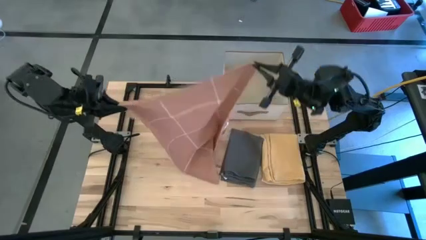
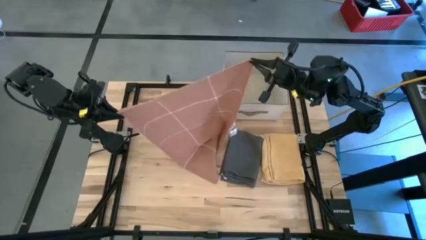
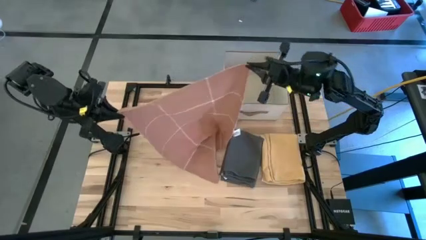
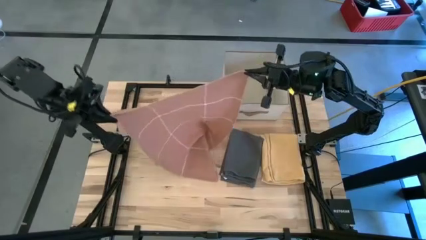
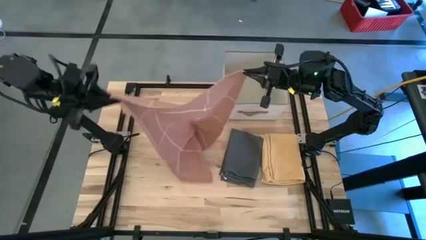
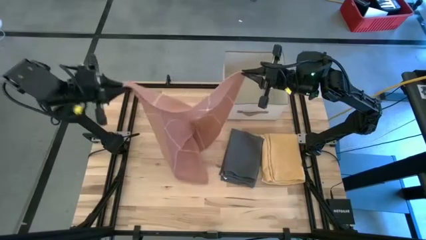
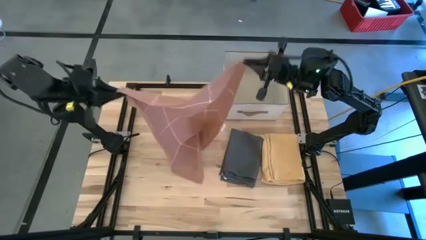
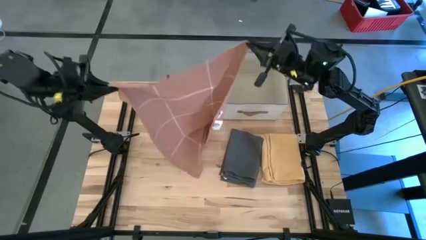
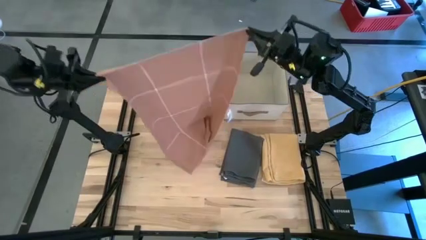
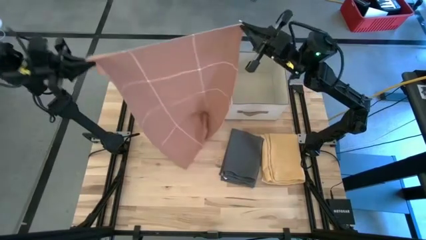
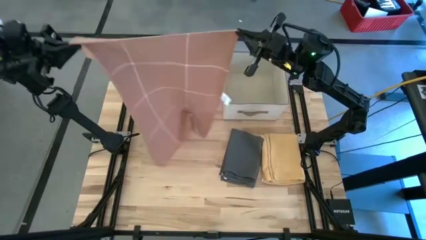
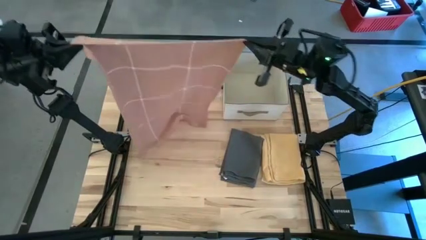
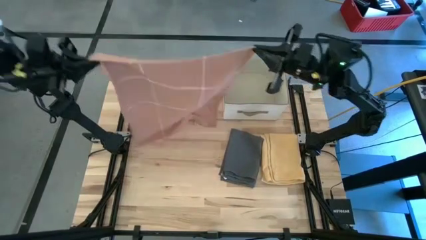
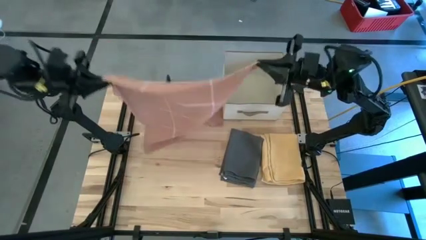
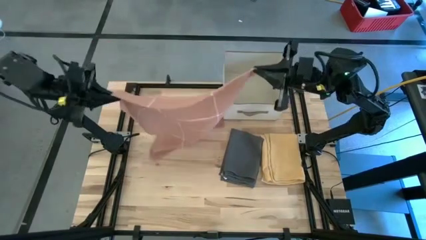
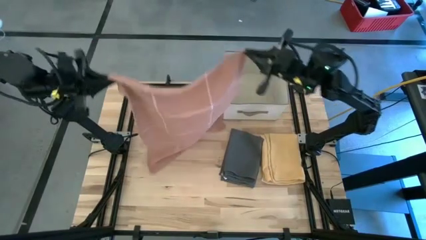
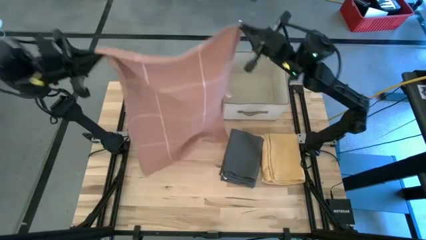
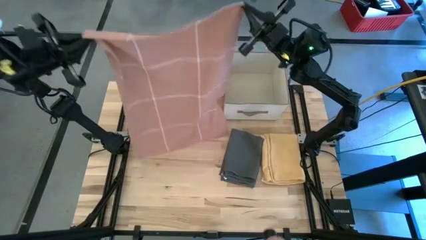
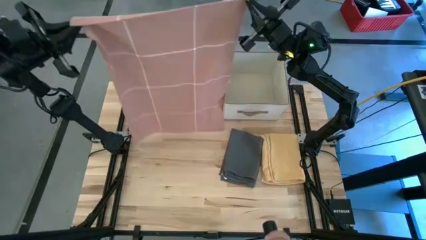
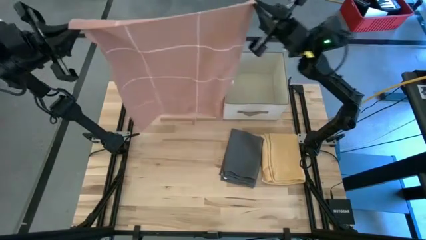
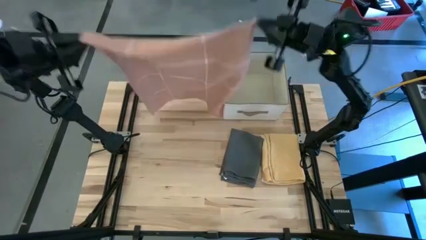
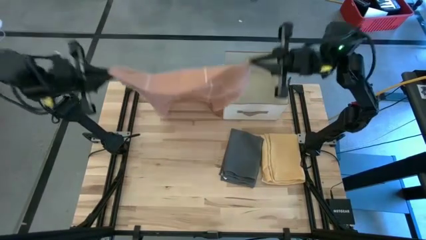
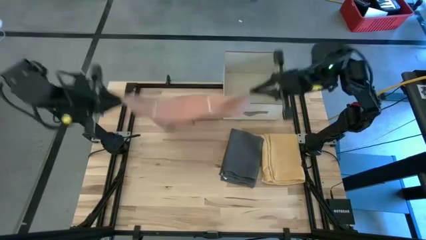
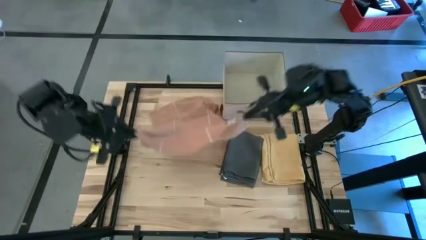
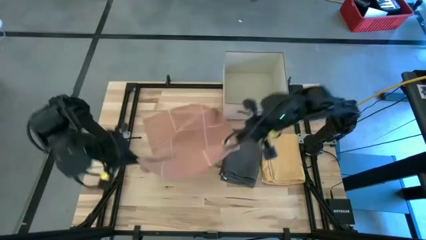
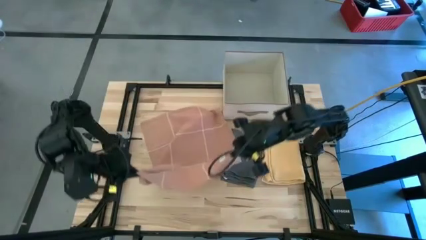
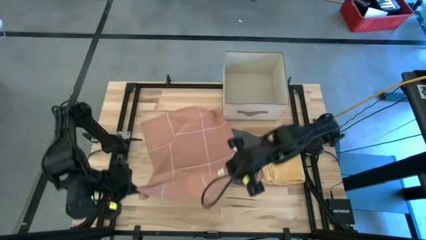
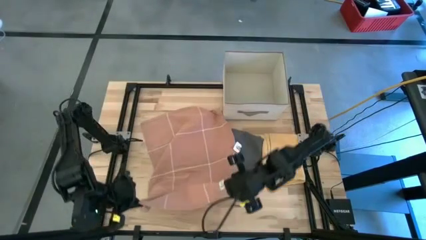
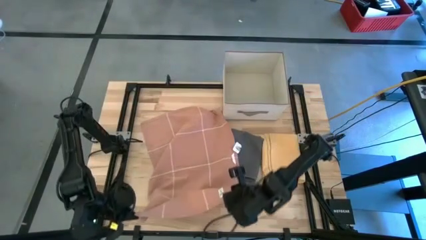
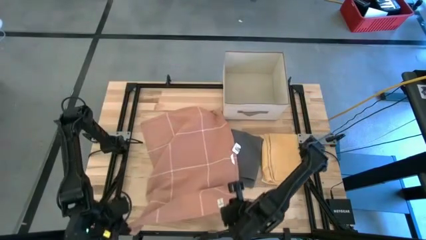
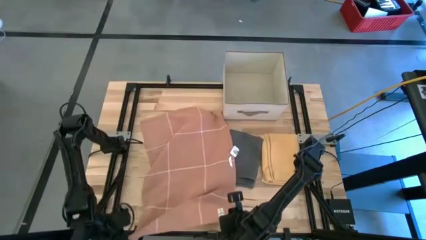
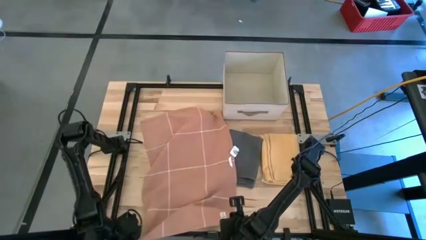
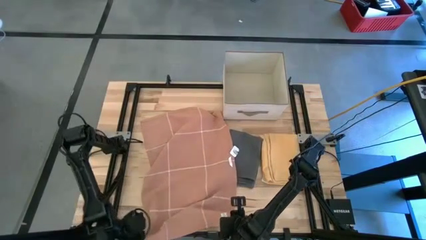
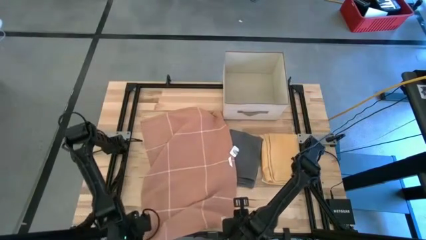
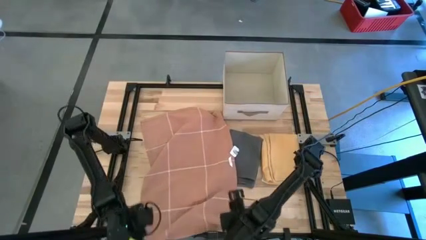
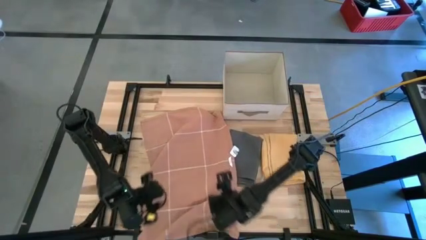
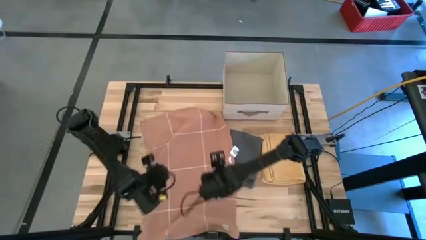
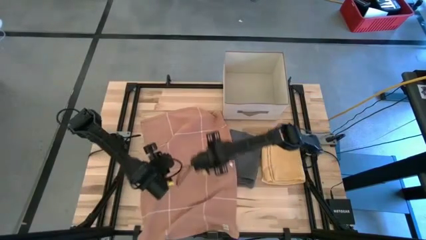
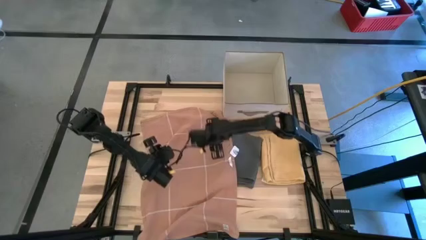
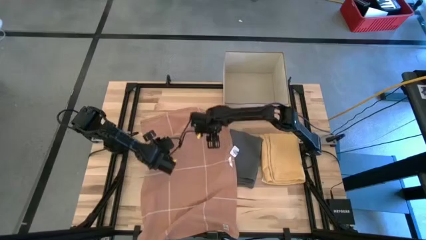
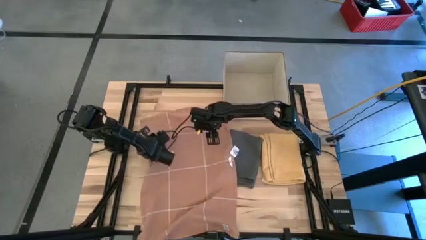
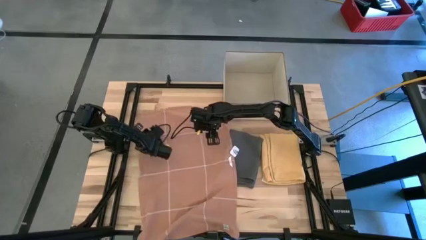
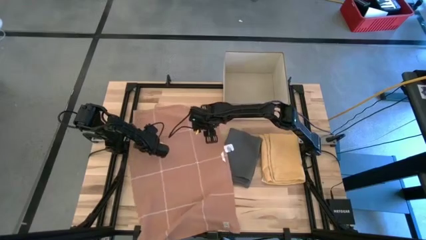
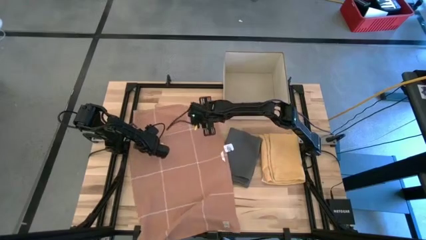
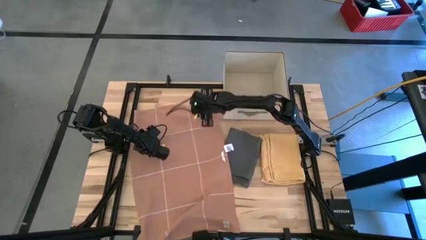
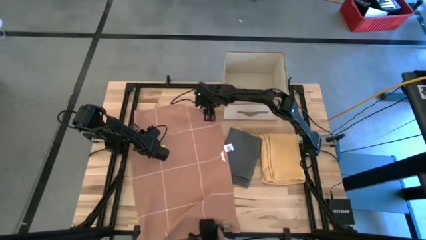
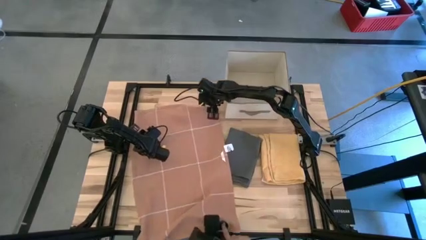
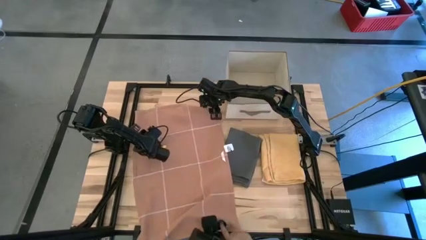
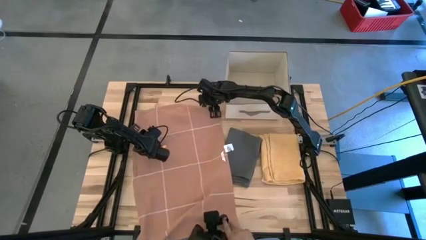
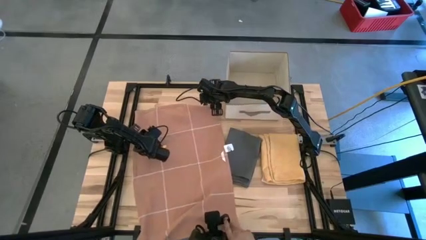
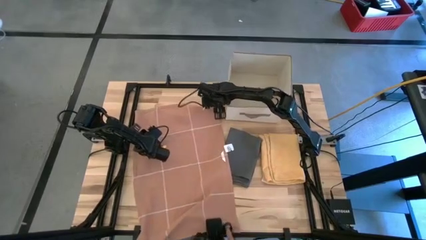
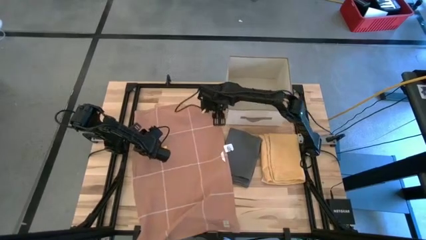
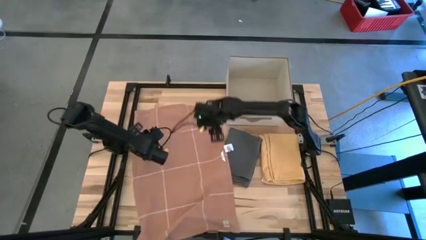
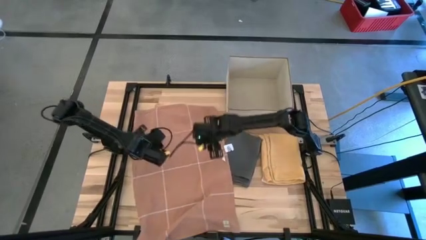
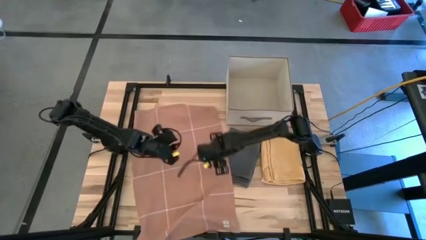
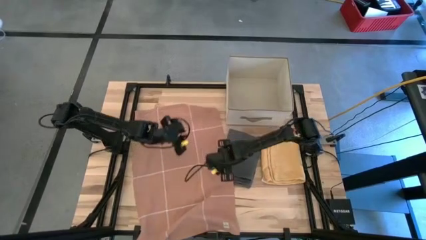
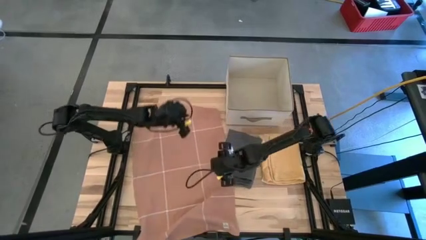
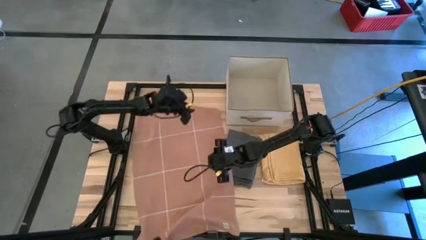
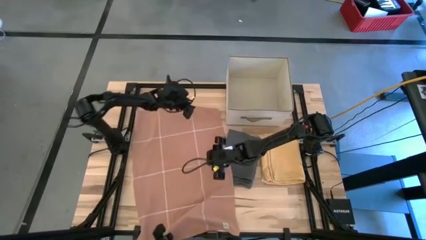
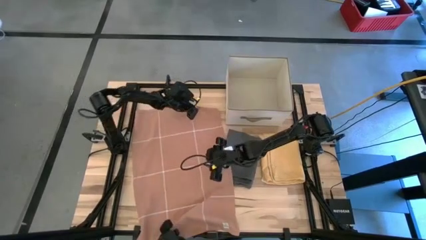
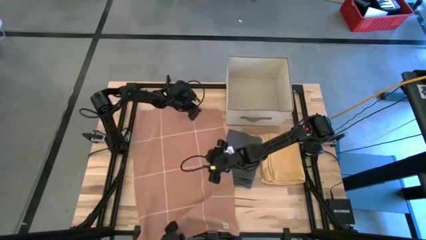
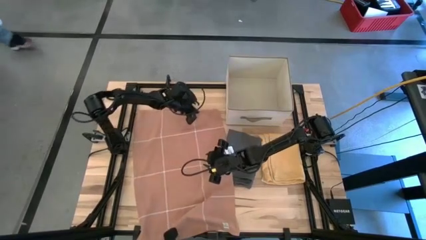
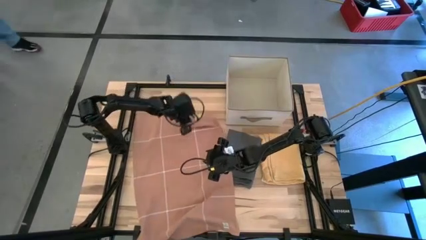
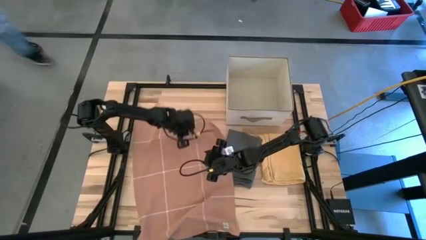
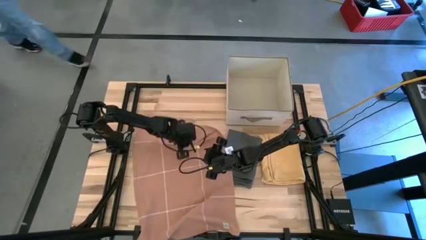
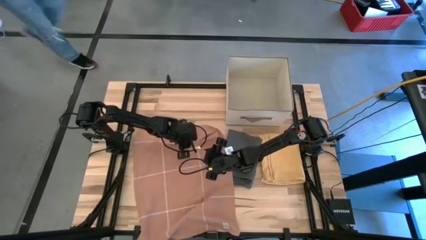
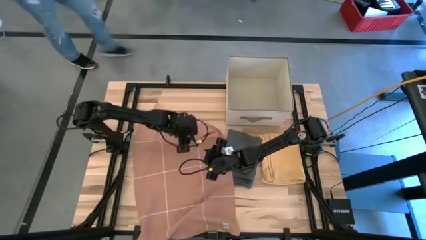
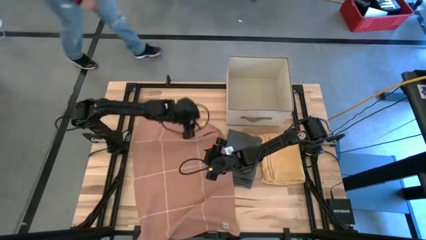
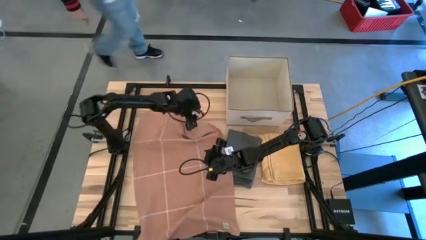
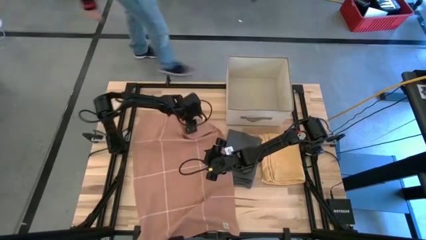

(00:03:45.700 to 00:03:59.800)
Task: Fold towel
Fold the brown towel

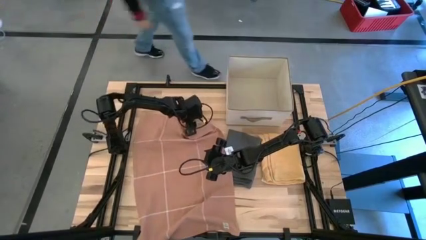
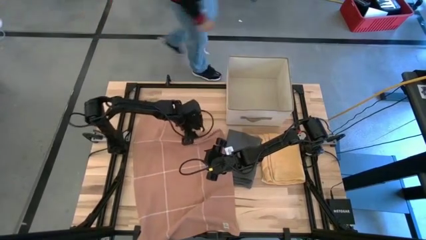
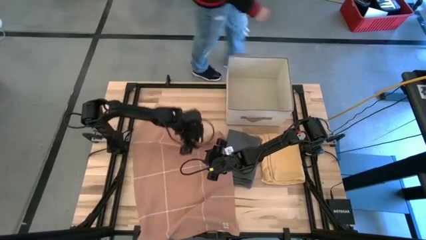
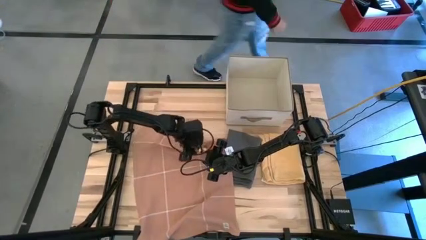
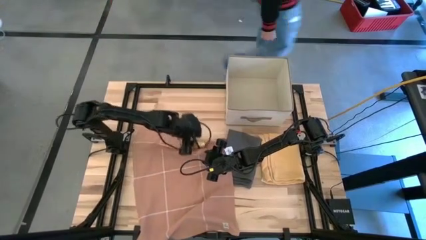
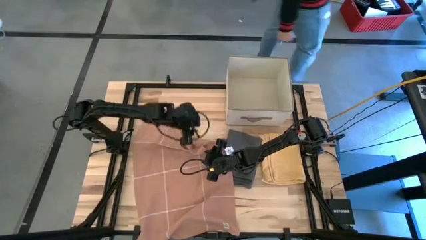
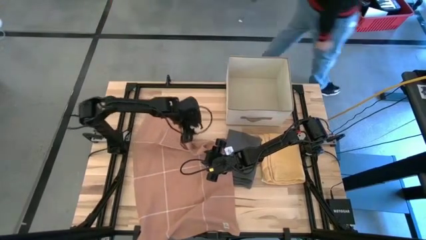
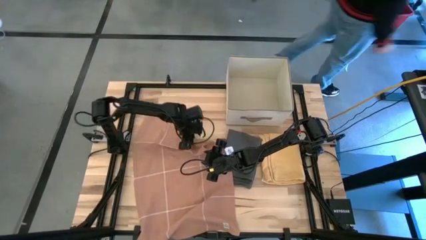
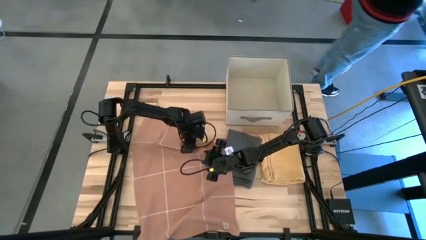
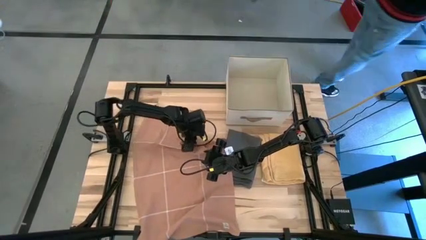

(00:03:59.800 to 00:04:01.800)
Fold the brown towel

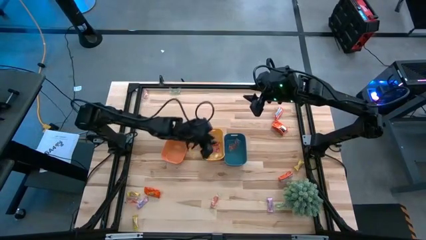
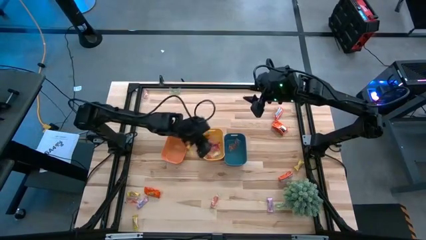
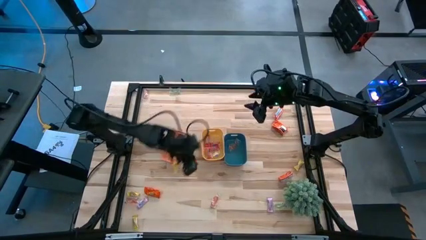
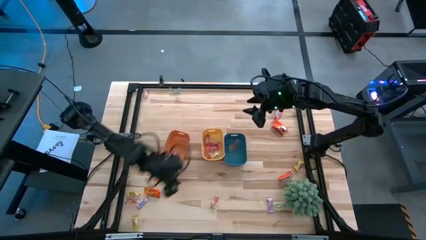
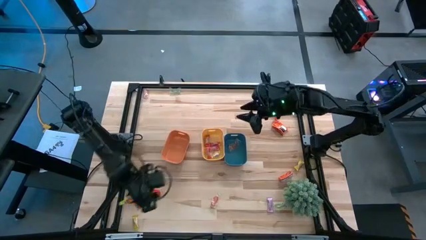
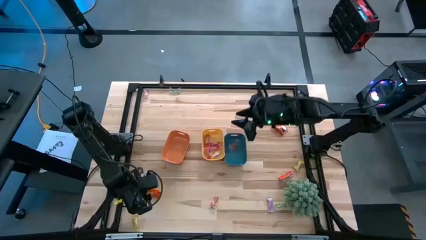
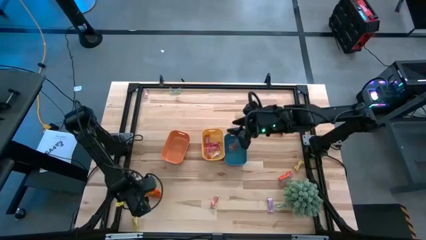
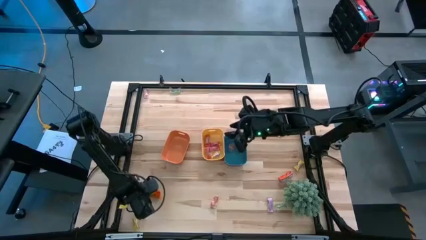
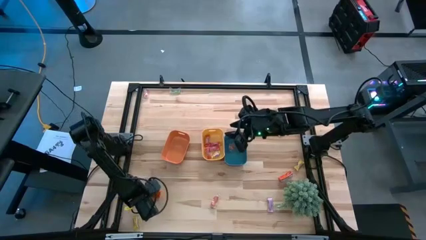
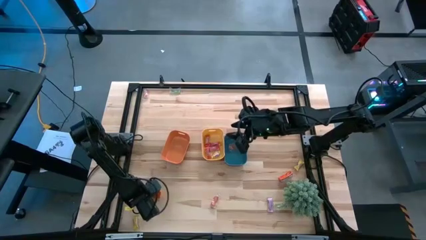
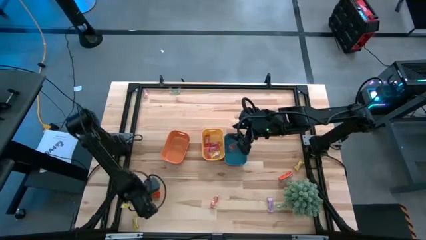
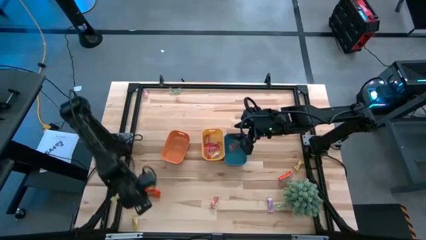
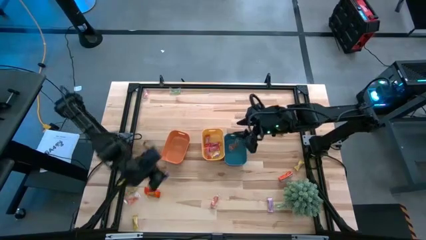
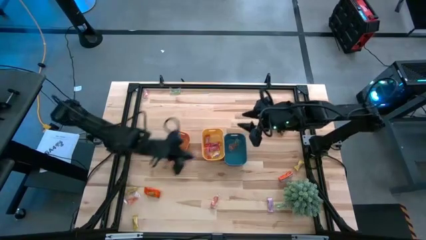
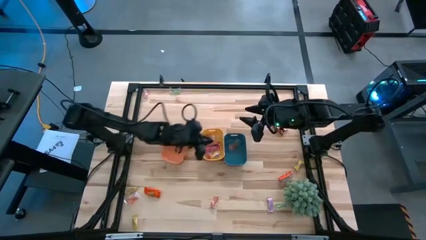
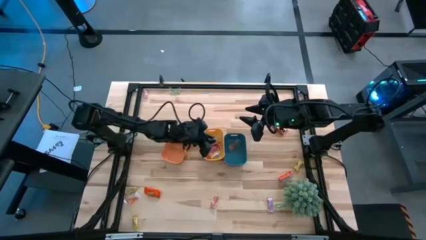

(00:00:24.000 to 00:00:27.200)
Task: Sort candy
Put the purple candy into the yellow bin
